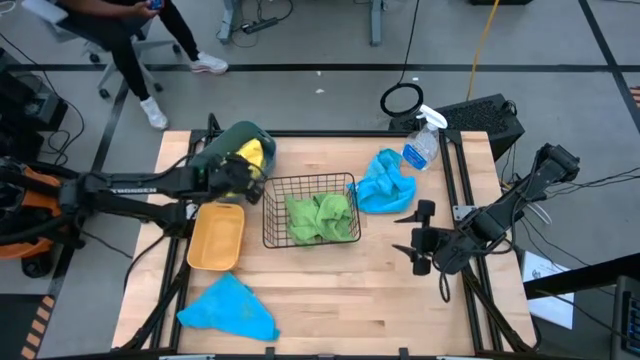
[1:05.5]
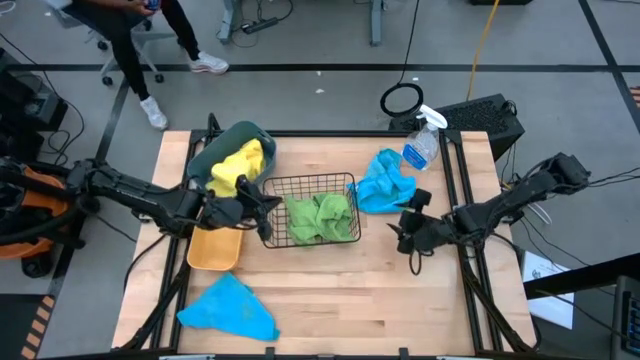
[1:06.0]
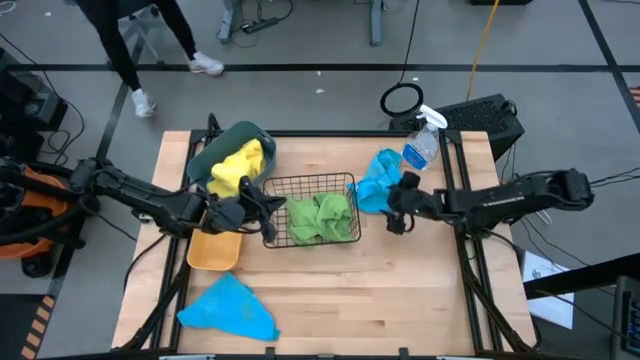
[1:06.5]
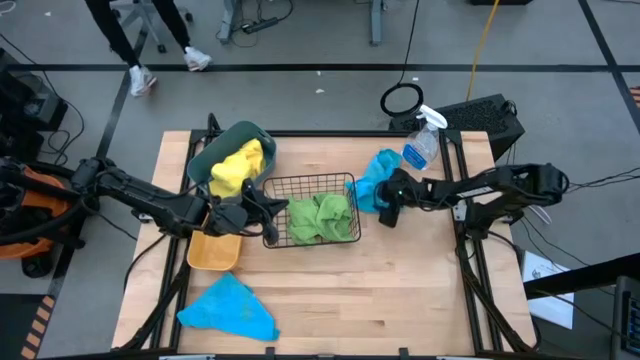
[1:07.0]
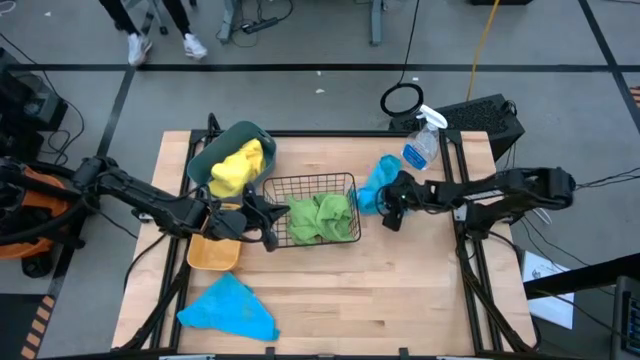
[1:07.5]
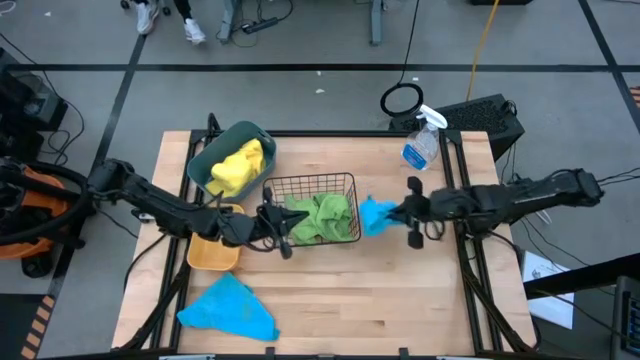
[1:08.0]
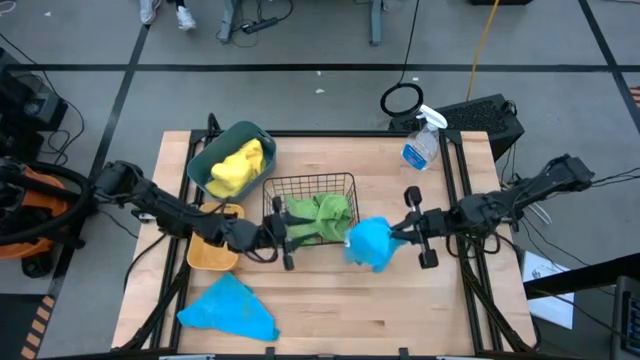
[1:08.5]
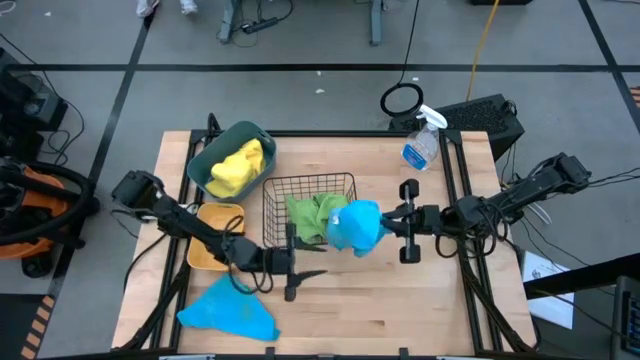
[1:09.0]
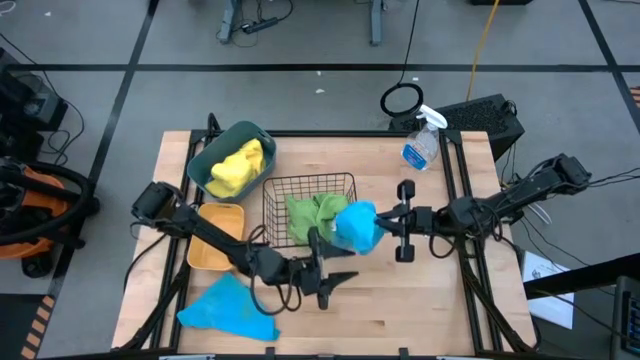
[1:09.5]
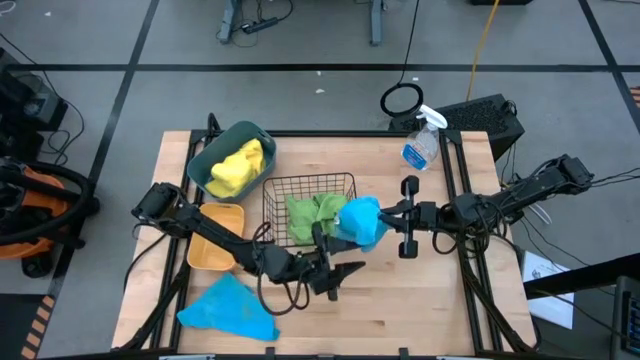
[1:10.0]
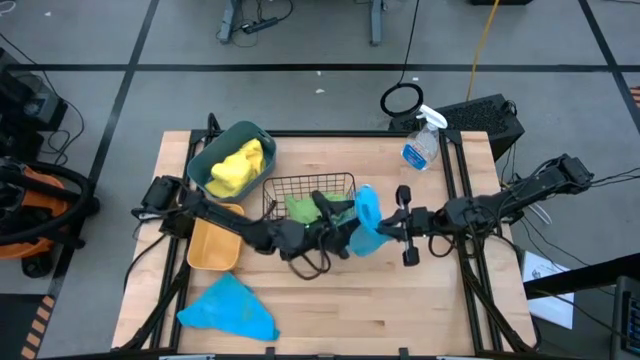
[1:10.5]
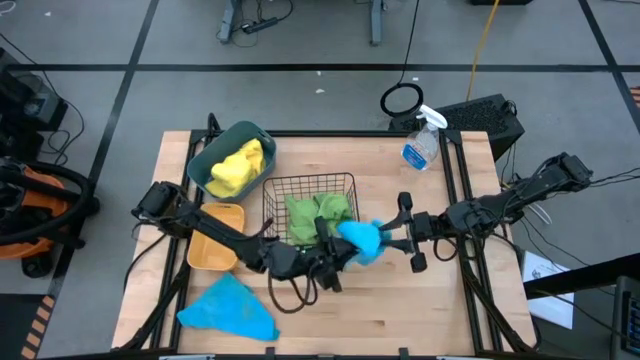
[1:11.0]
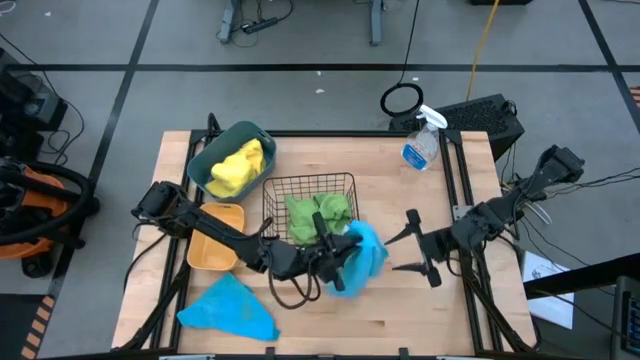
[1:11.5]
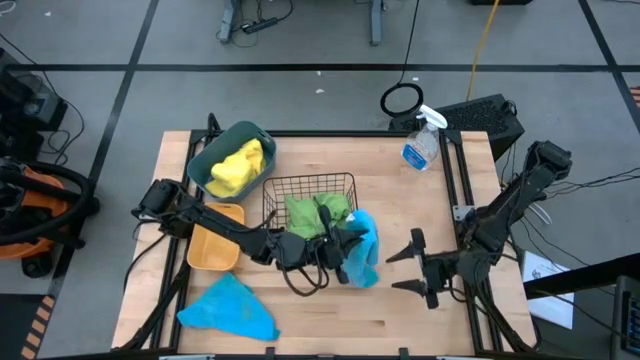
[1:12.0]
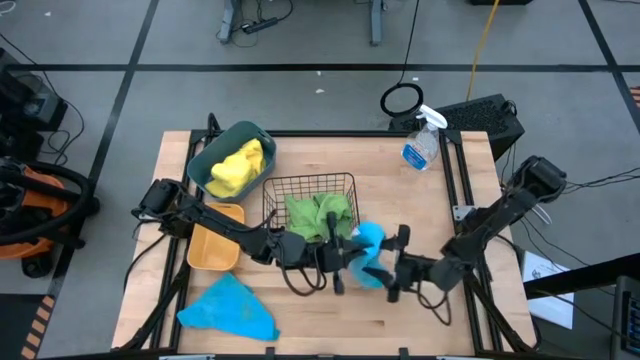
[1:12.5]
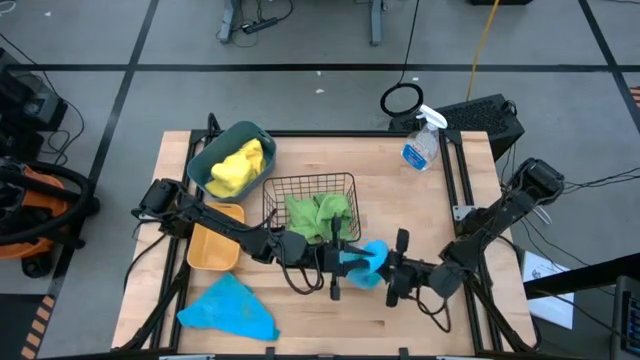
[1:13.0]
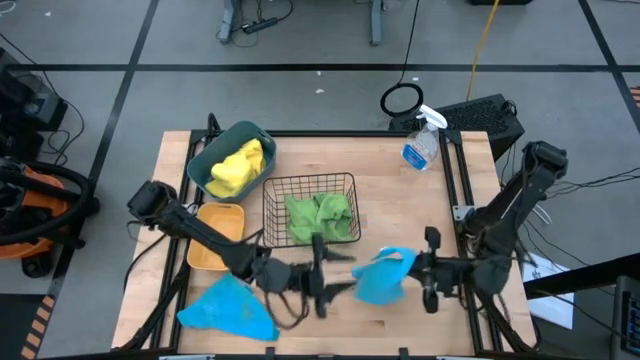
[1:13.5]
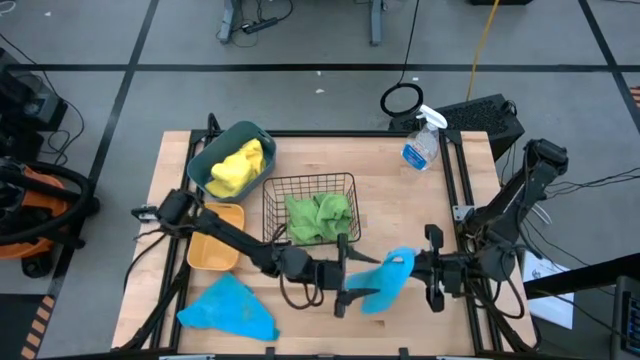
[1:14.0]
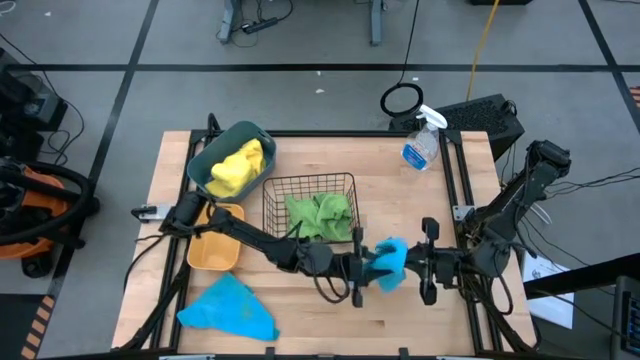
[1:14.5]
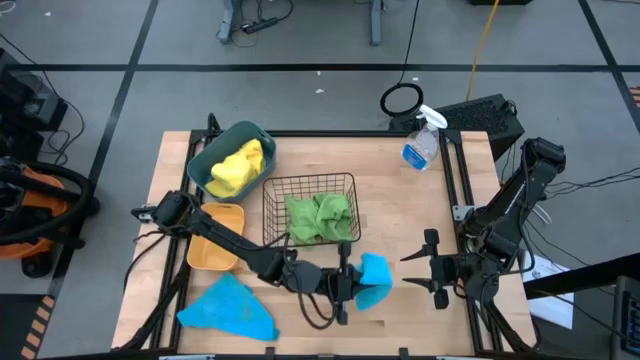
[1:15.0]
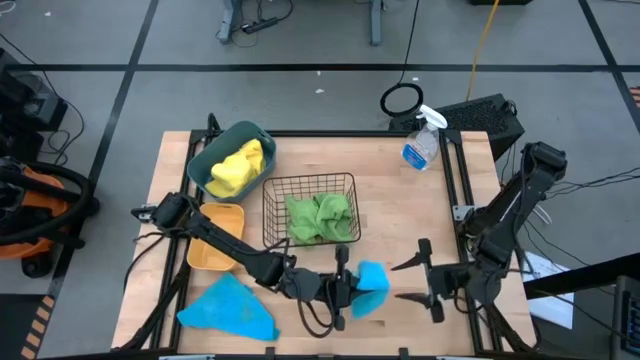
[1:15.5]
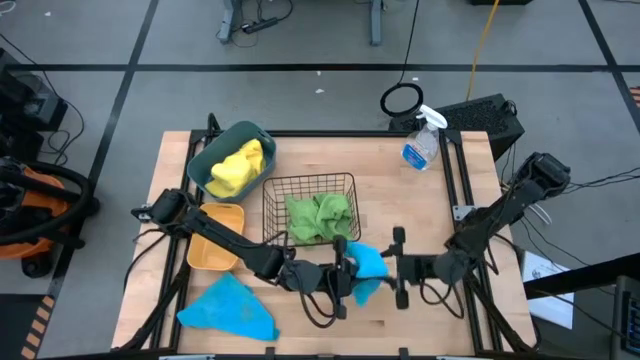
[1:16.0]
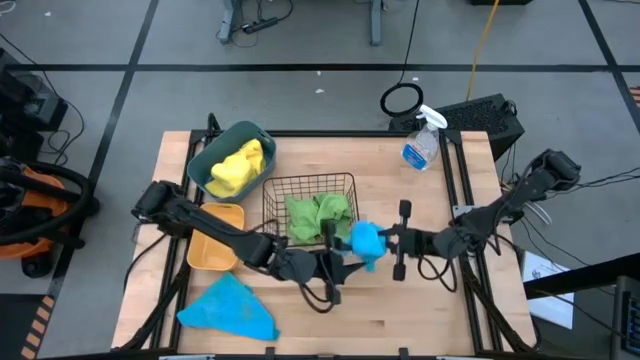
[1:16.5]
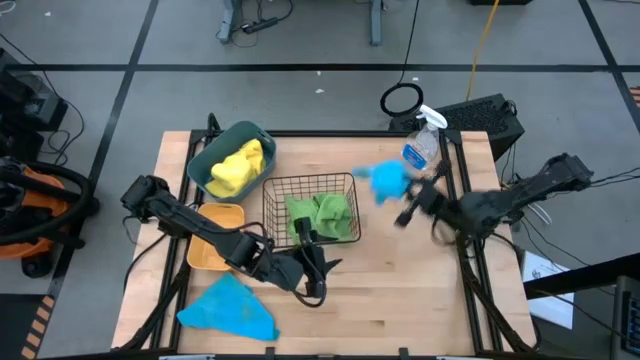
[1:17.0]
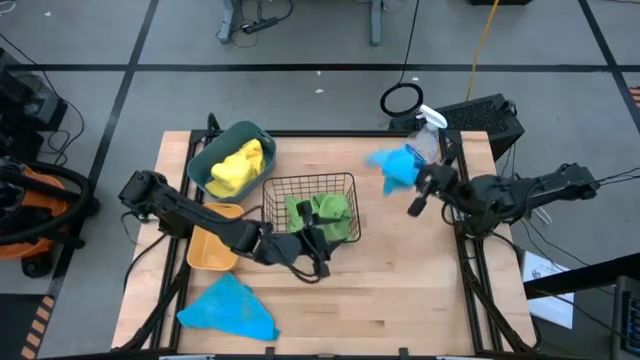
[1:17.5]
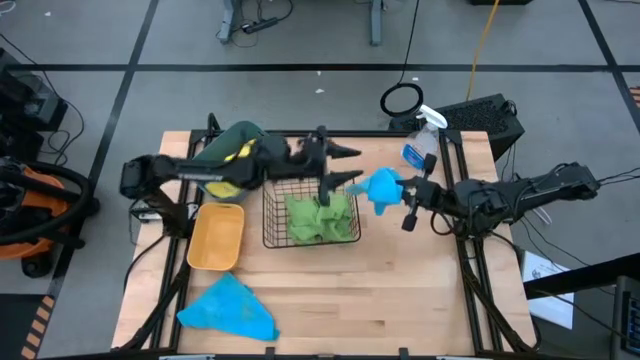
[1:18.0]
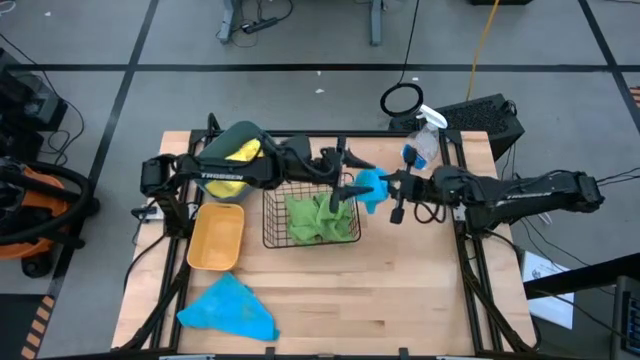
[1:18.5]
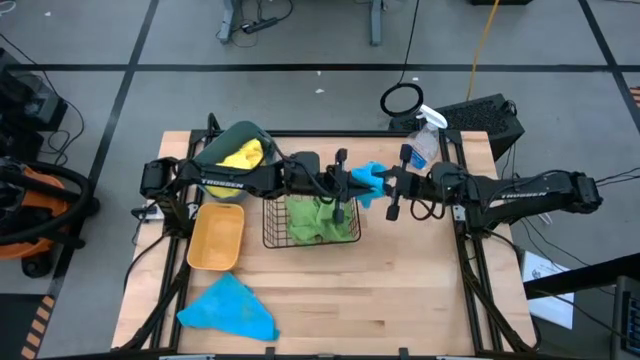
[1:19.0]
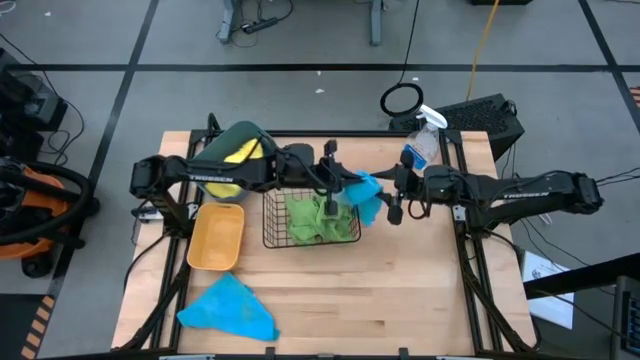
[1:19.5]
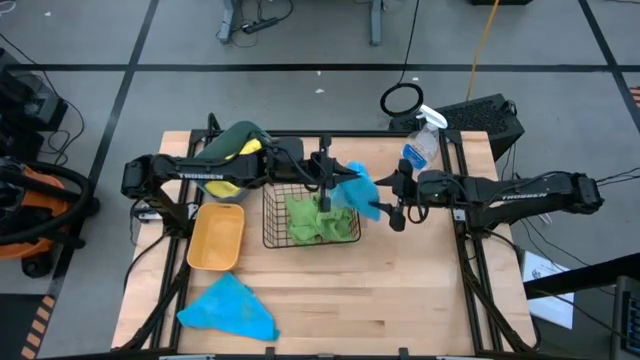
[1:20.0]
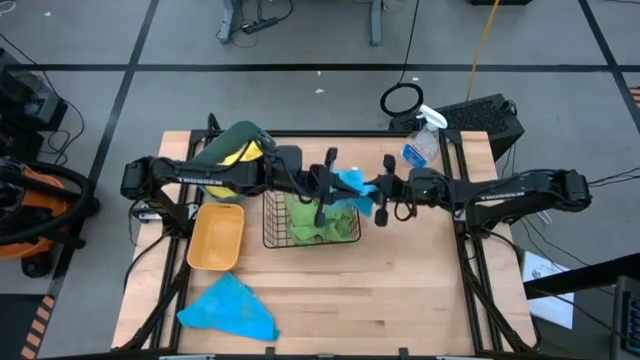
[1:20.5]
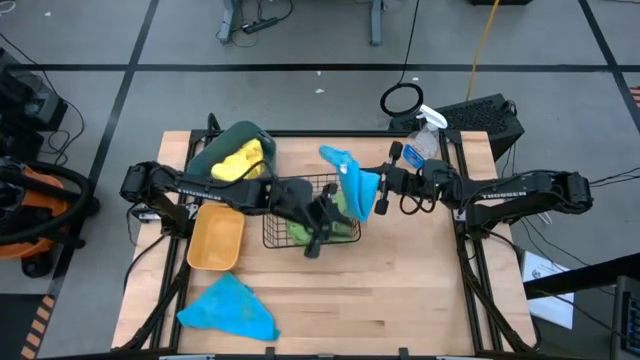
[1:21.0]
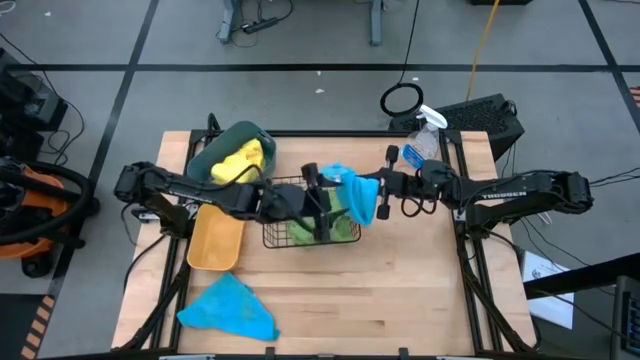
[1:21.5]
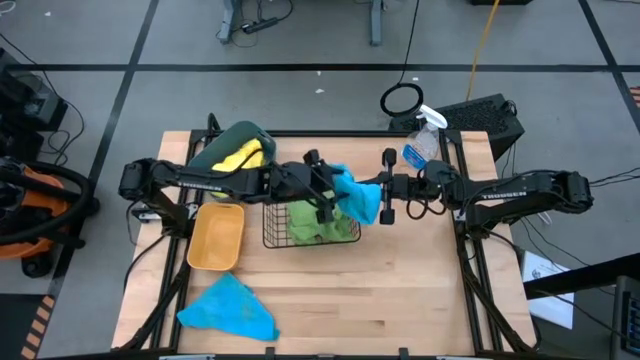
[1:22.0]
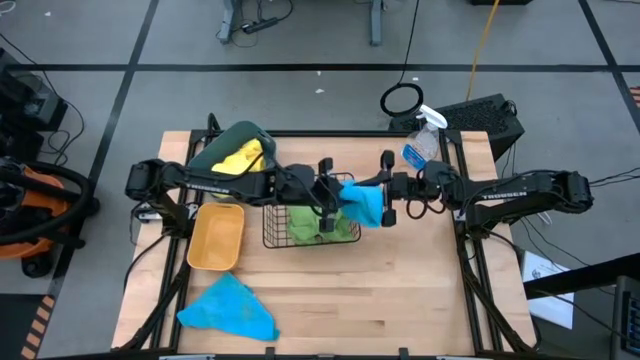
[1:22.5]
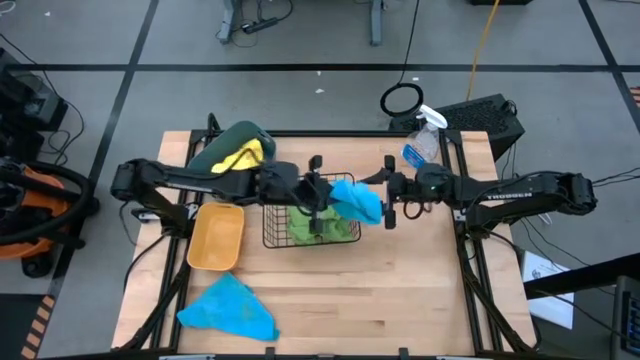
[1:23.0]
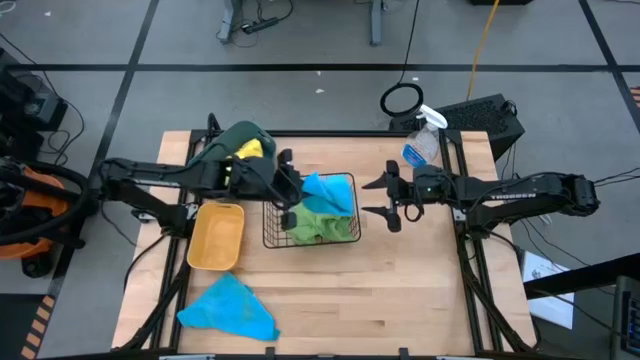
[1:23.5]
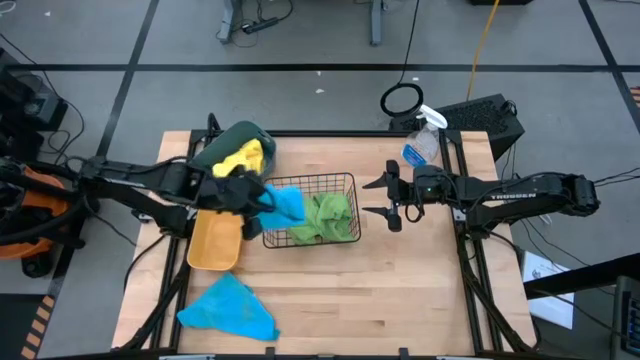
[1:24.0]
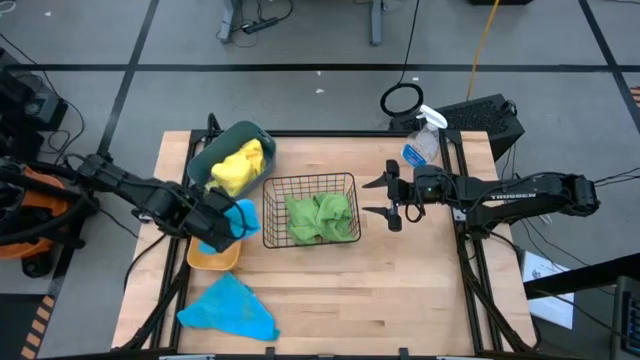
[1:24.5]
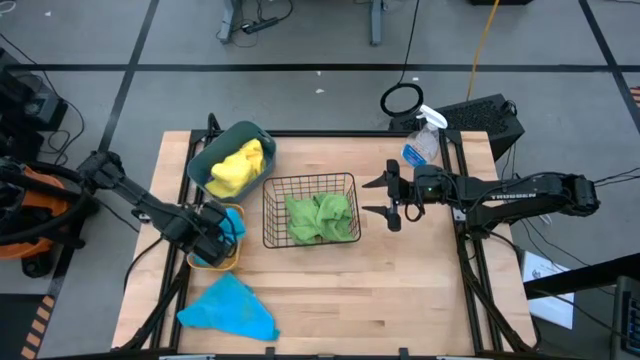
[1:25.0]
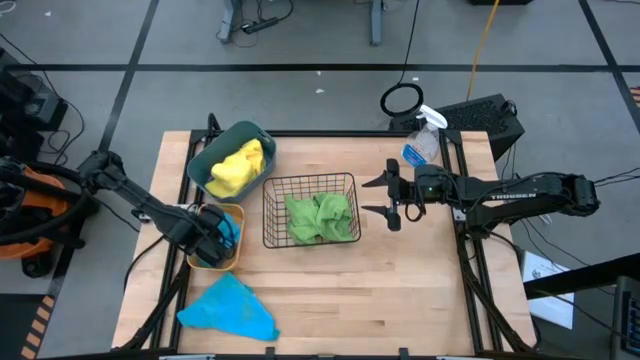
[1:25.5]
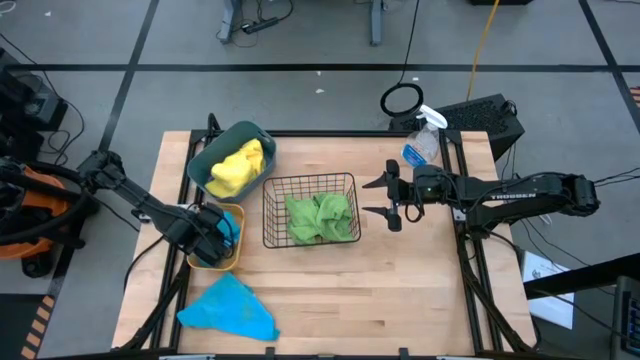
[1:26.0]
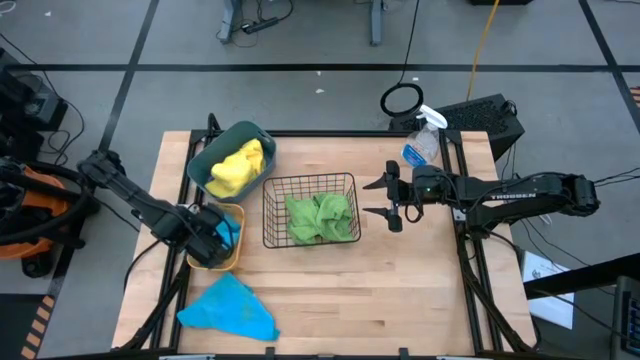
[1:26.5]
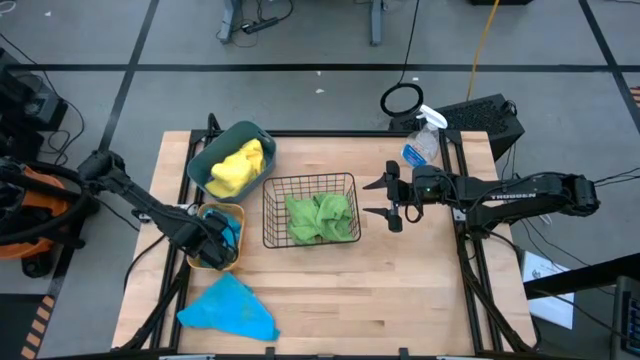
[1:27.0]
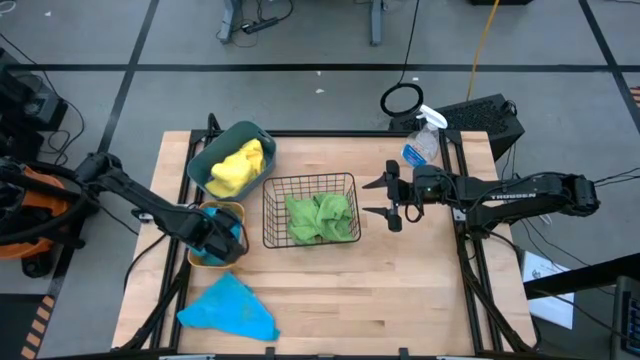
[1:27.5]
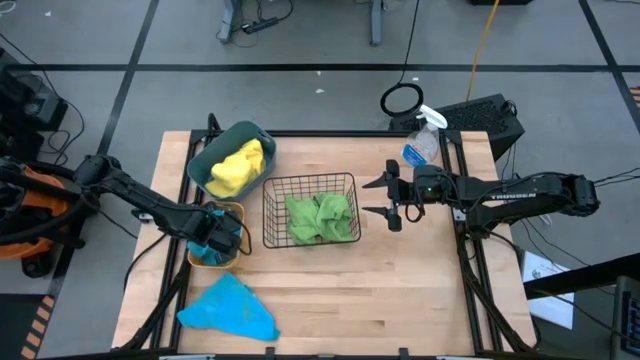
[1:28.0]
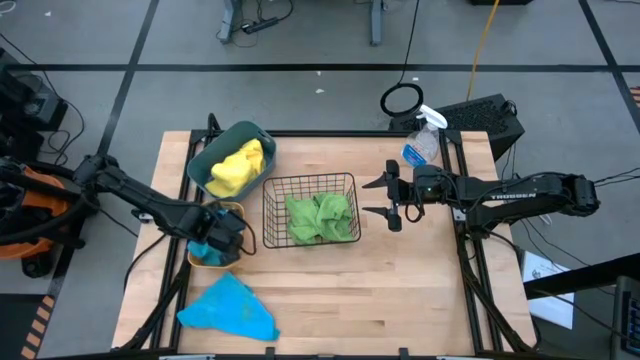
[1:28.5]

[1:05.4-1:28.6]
Task: Sort microfiber towel by color & place in baskets
Put the top blue microfiber towel into the yellow bin
